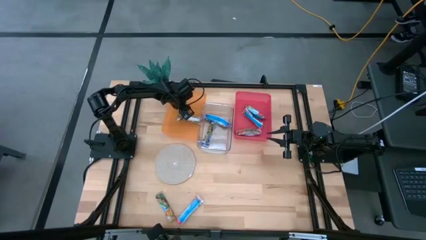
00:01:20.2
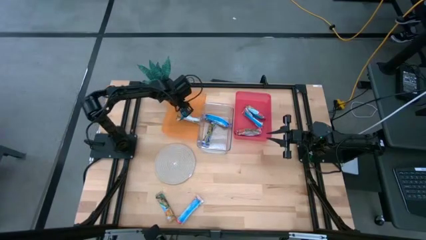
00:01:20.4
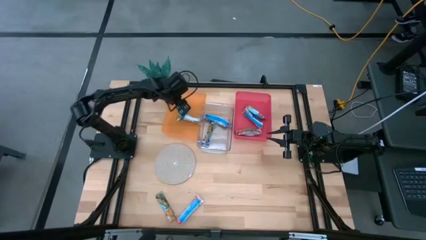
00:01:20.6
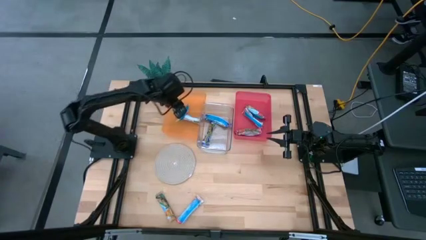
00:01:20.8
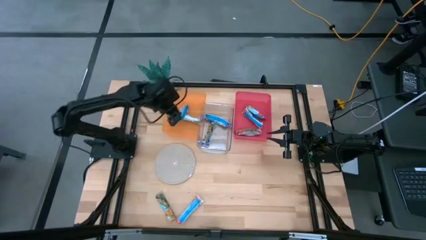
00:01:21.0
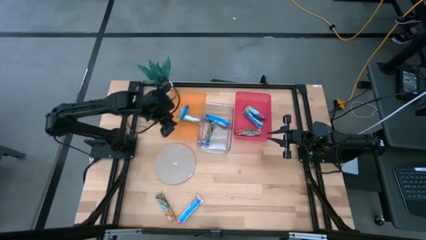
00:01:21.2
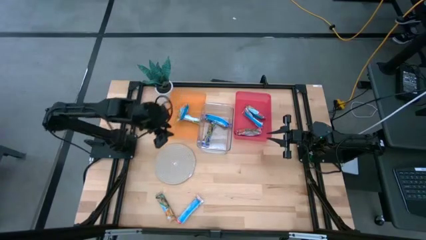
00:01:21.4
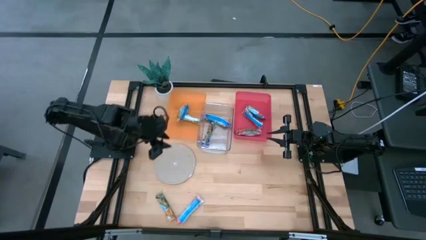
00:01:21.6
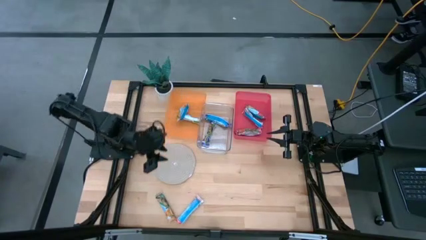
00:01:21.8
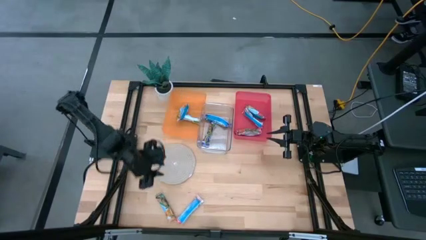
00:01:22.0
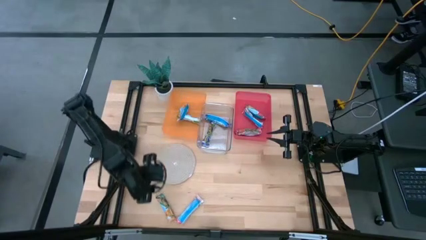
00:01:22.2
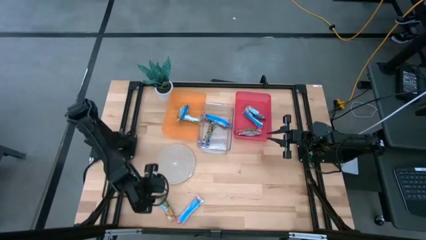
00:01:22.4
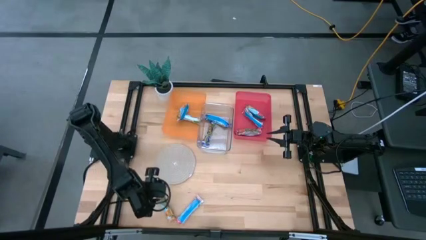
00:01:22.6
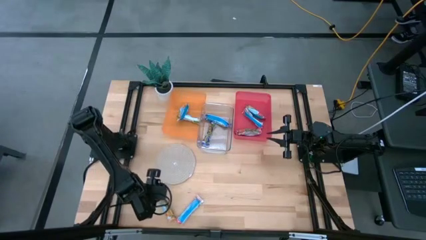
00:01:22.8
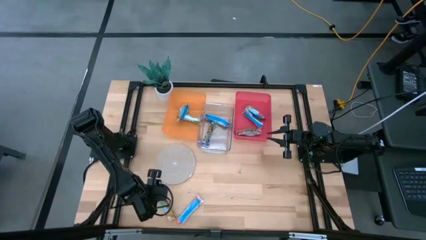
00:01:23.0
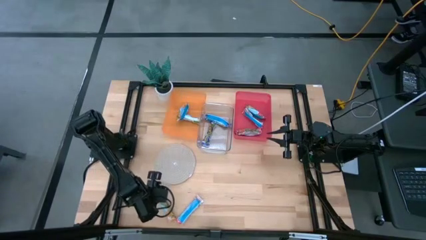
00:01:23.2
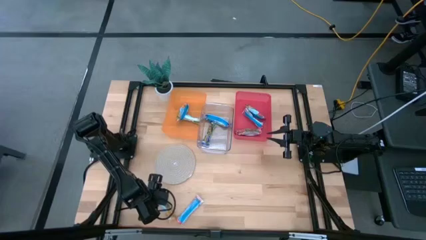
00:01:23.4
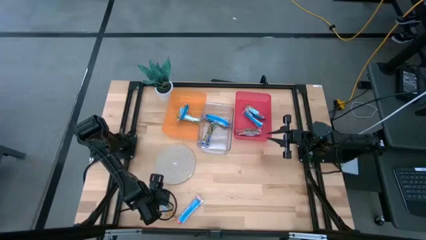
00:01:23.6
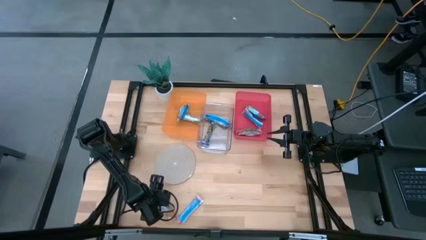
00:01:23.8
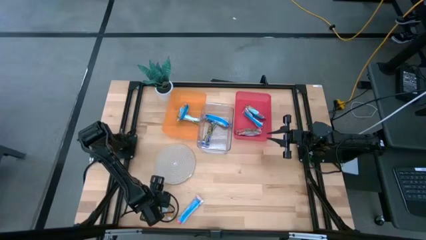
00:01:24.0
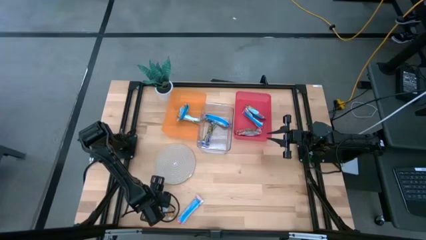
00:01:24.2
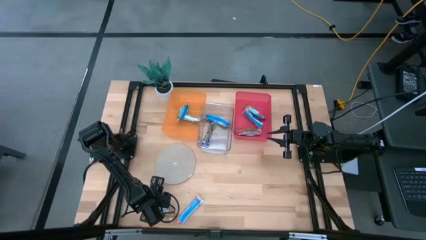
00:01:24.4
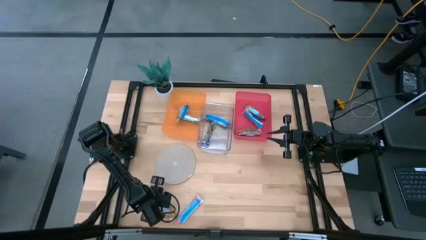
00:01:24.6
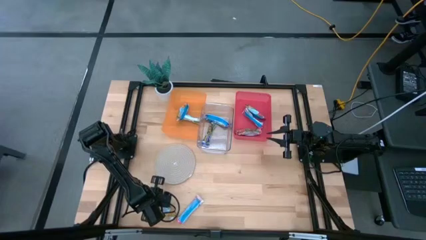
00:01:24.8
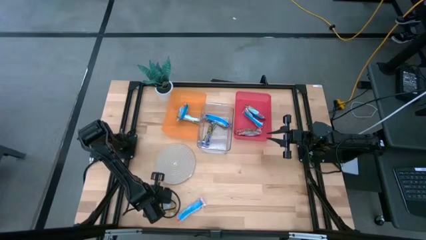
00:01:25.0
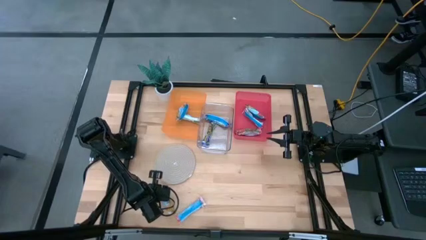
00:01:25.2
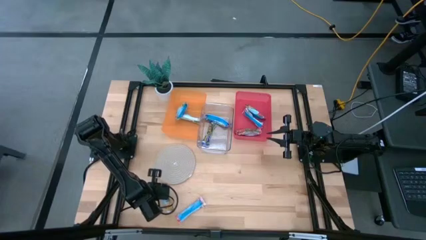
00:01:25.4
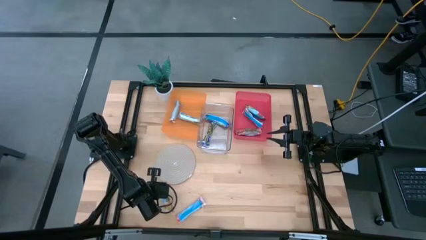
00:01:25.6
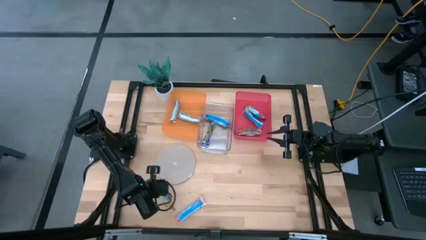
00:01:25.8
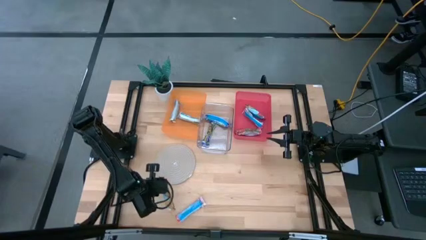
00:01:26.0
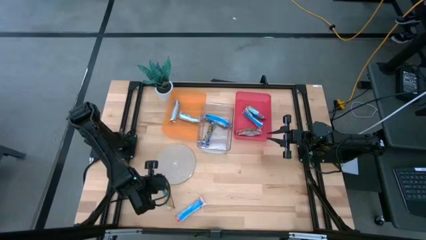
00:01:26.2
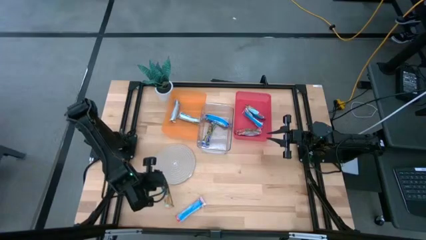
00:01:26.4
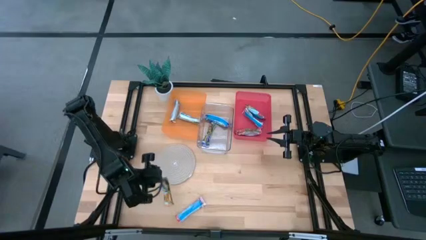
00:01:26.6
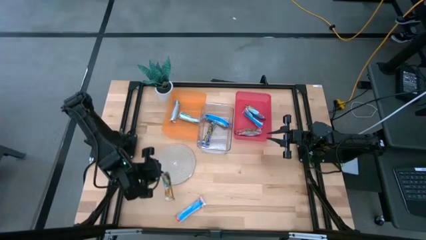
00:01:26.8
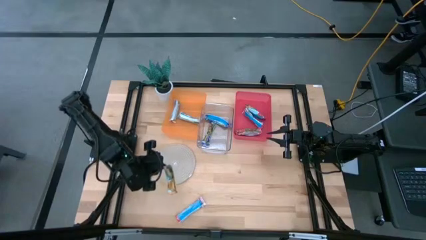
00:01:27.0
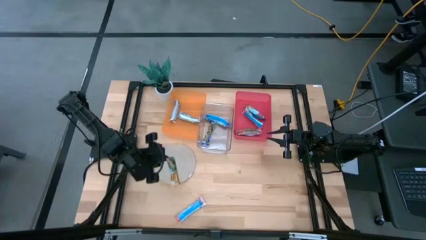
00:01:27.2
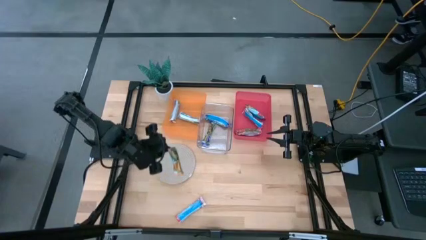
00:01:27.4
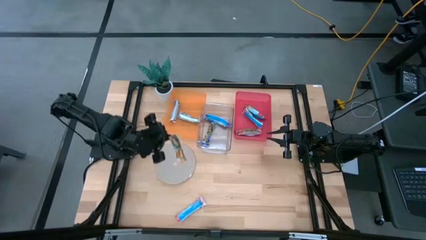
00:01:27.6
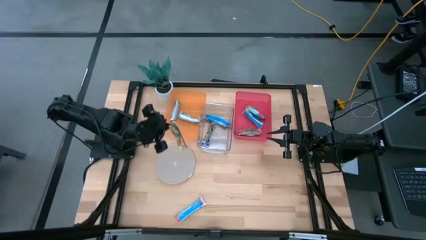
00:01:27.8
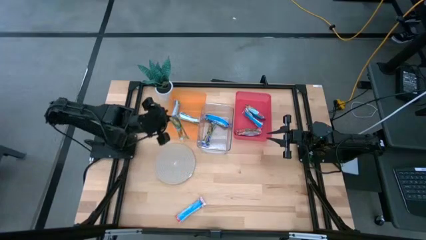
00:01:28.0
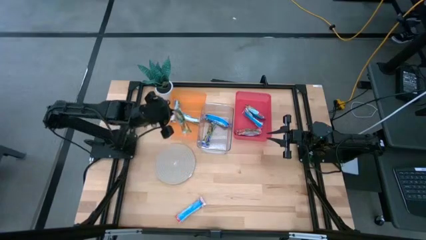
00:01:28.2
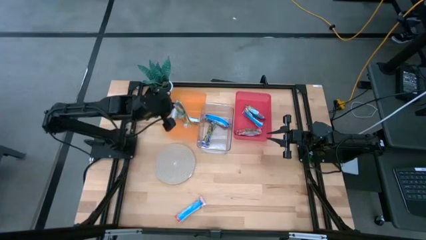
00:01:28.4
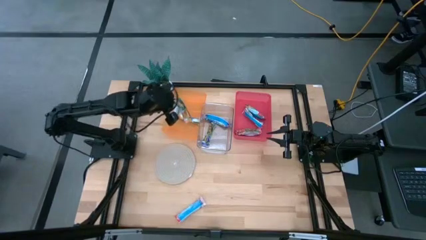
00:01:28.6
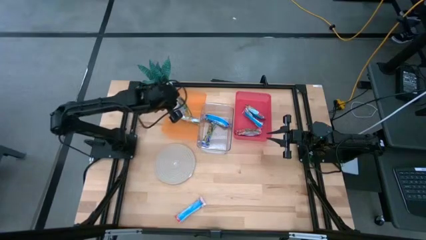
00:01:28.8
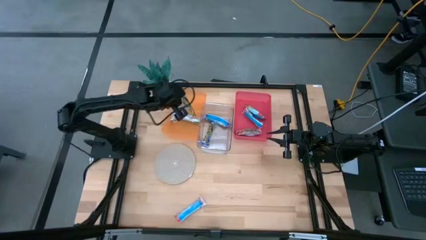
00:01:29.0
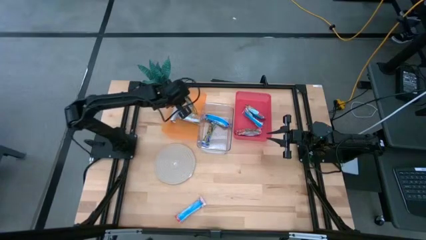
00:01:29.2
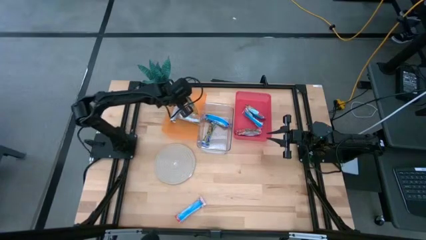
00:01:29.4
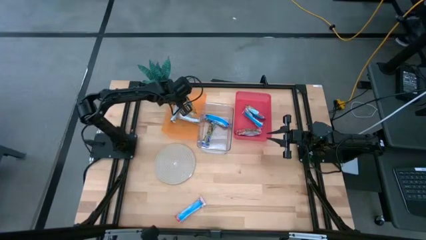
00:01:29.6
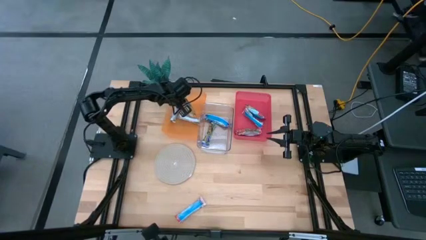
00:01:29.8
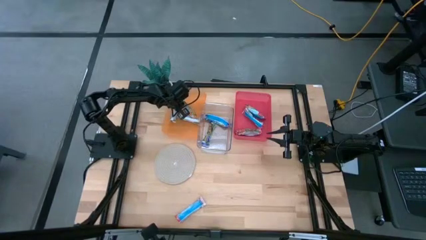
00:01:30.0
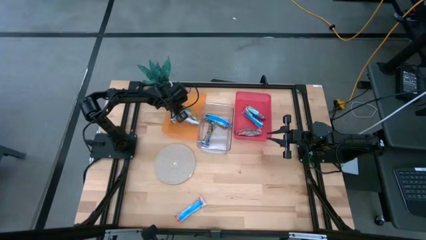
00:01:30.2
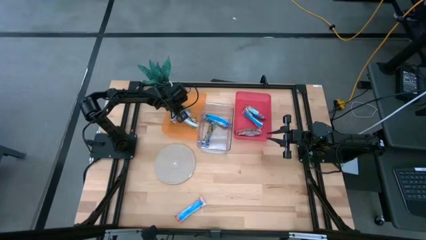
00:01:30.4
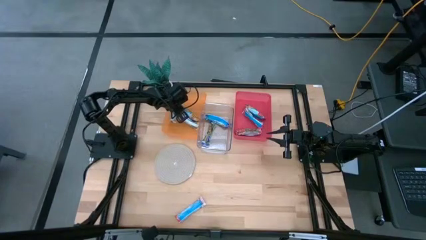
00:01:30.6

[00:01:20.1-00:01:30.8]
Task: Pick and place Granola Bars by type
Put the yellow granola bar into the orange bin

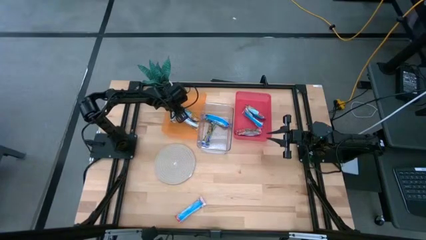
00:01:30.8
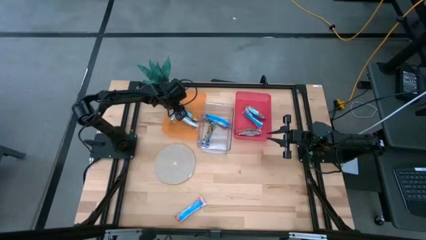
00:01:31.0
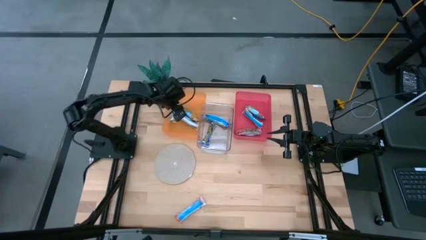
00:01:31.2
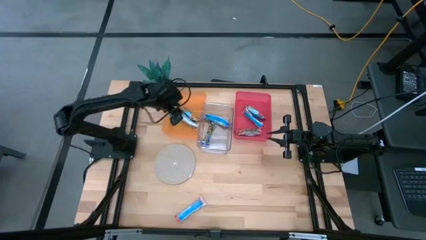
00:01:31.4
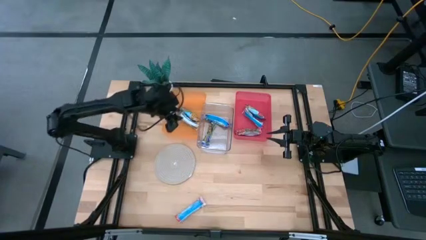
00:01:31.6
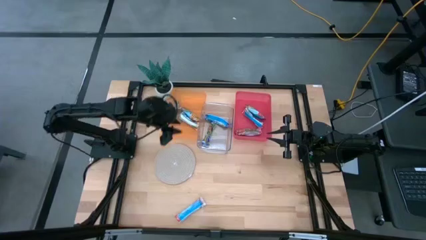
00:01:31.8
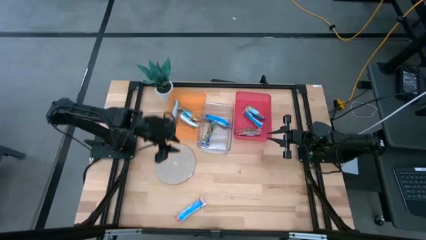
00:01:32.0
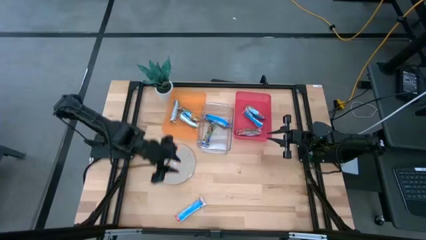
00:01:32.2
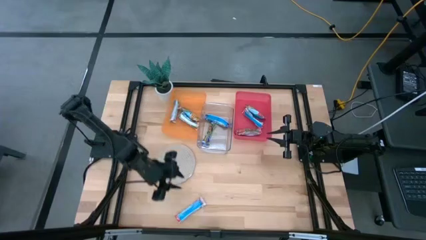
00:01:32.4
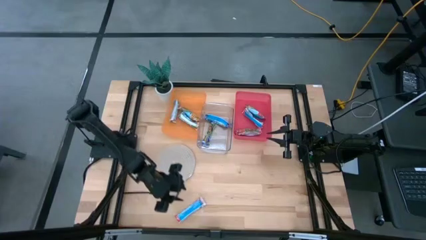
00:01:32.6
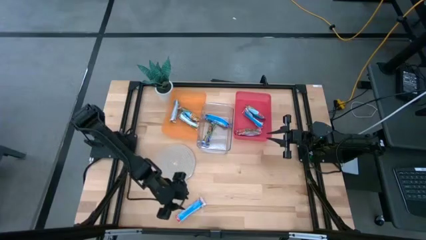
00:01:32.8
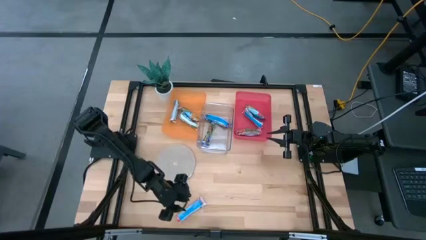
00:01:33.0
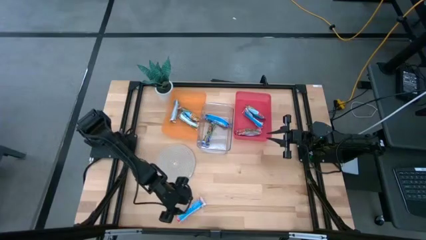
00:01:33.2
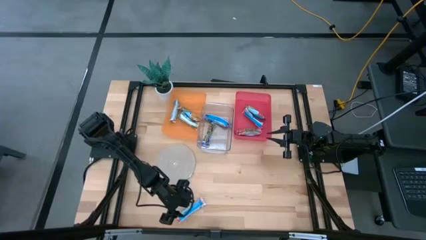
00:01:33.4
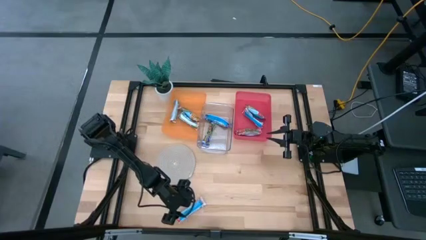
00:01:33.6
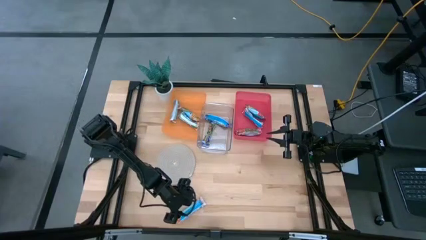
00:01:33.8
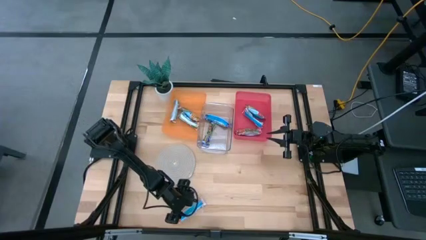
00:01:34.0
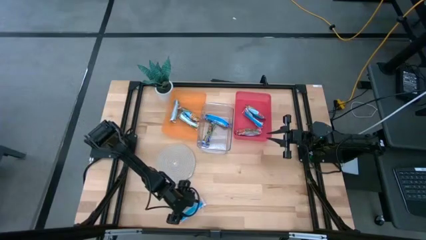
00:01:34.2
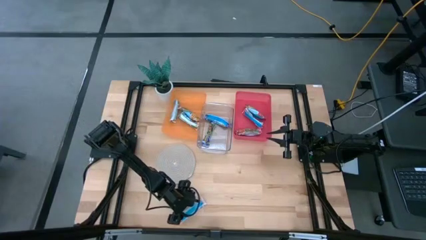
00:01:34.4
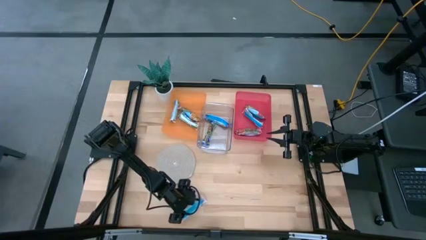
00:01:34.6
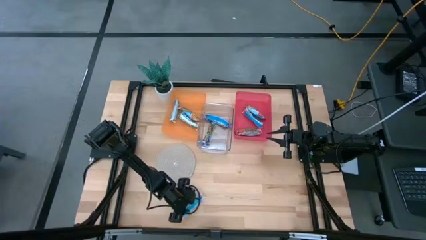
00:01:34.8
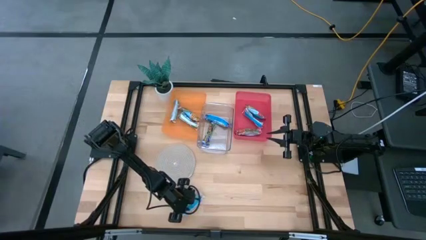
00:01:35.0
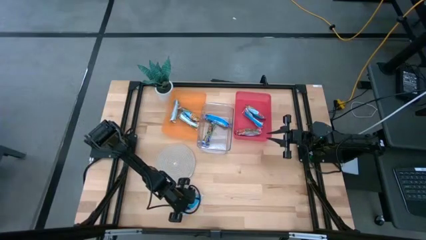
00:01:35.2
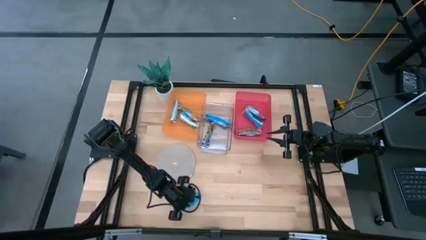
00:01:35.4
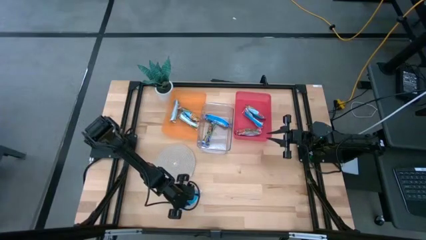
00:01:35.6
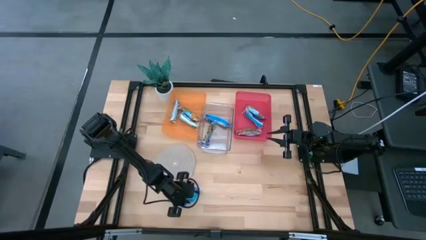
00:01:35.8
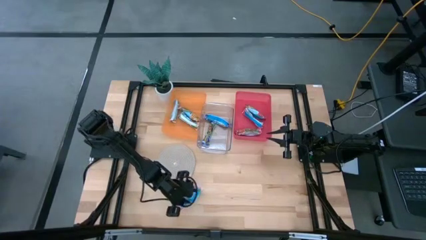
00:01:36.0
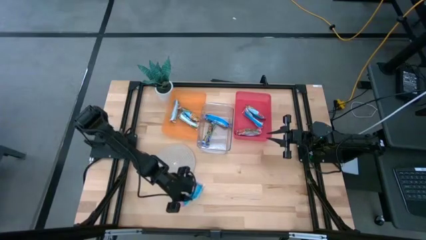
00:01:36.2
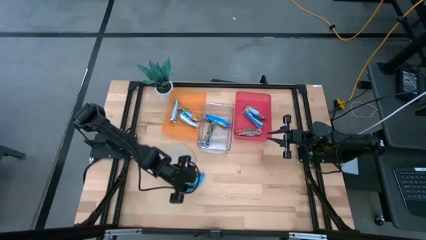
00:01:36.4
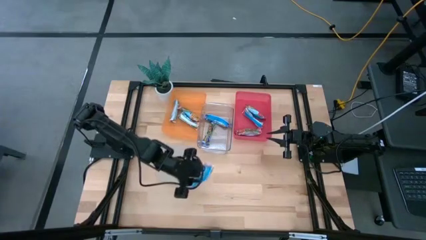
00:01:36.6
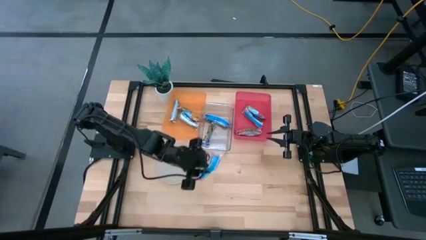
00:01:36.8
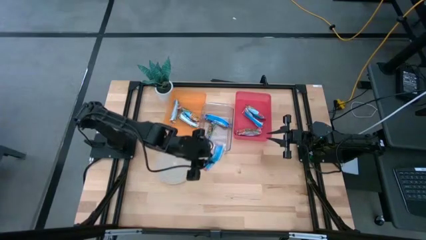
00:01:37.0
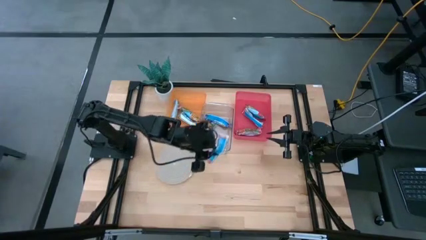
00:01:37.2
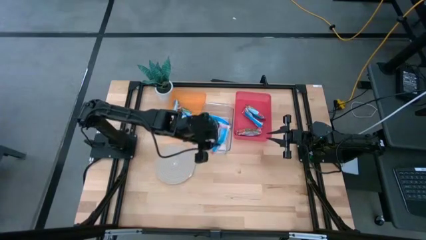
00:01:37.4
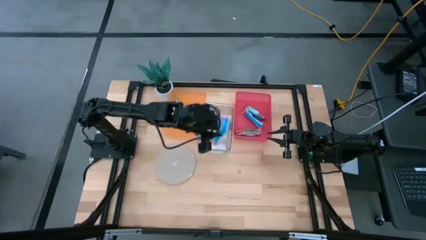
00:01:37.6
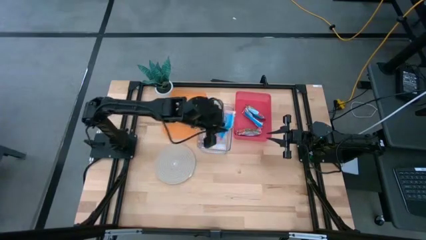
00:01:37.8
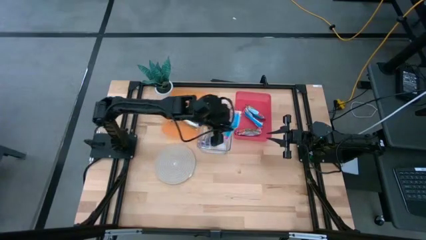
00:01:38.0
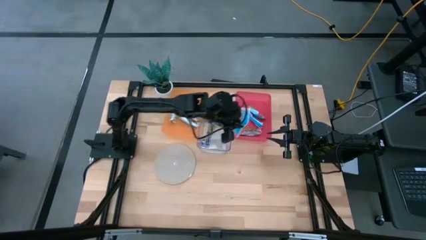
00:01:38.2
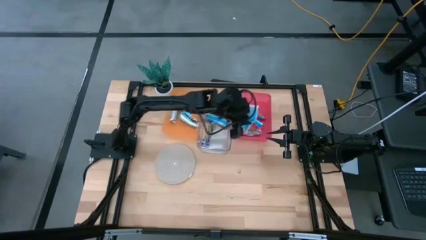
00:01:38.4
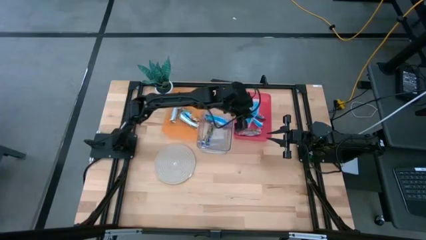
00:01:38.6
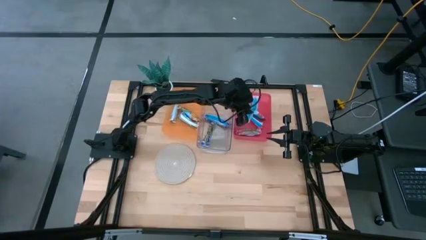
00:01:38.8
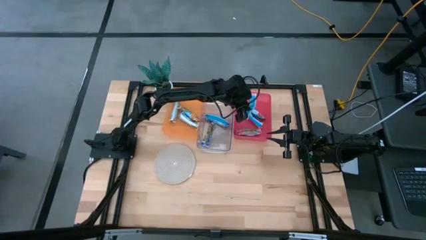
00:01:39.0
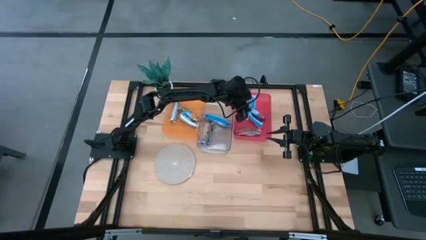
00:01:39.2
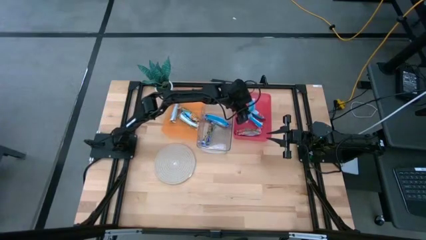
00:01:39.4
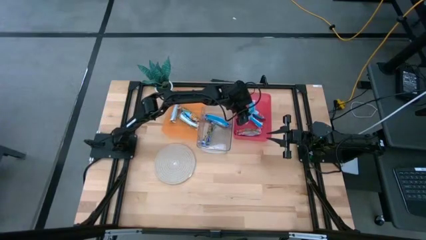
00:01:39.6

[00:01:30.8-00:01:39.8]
Put the red granola bar into the red bin
